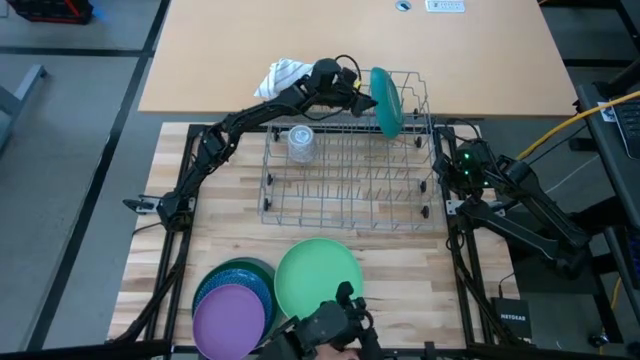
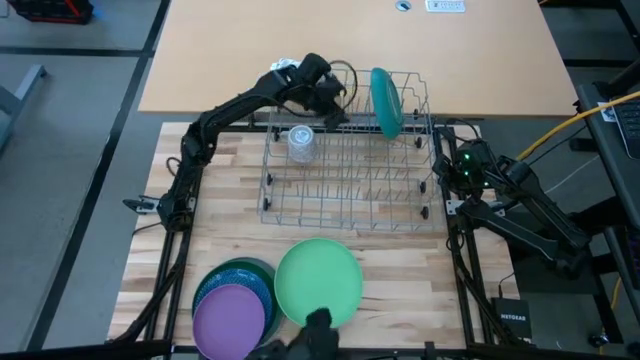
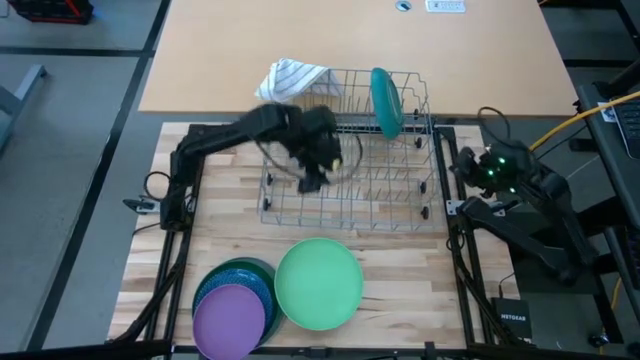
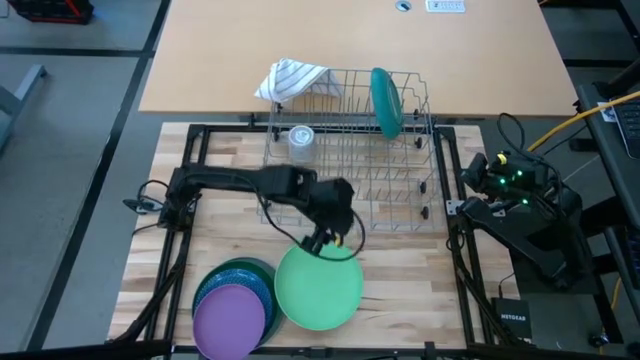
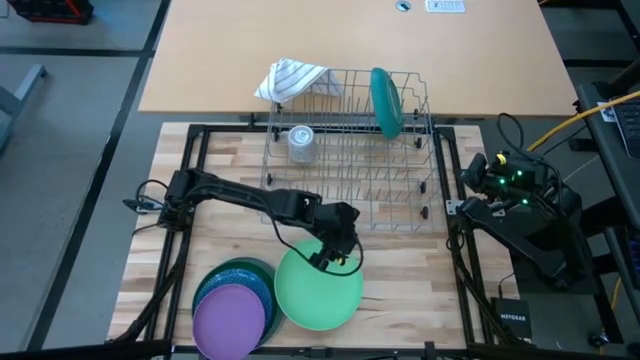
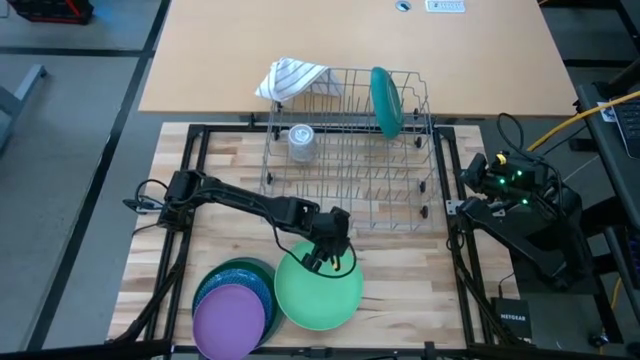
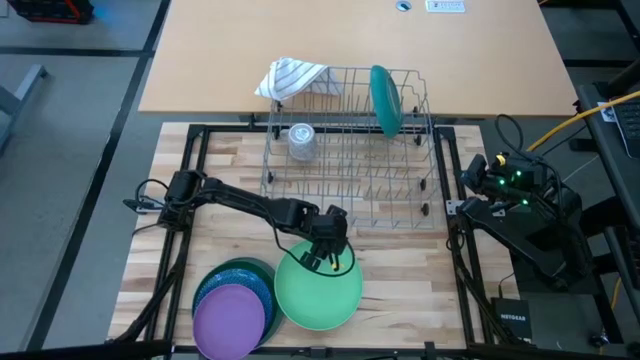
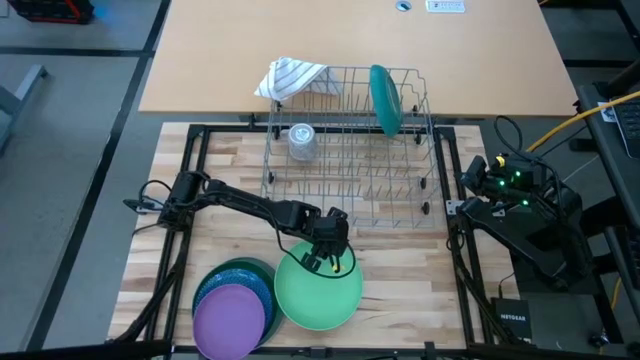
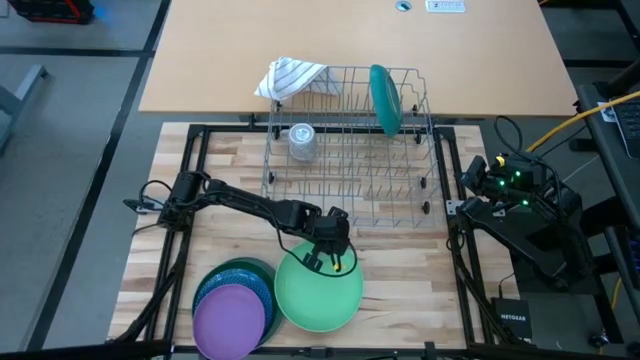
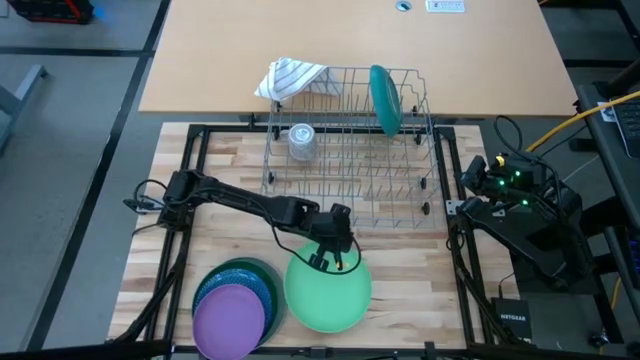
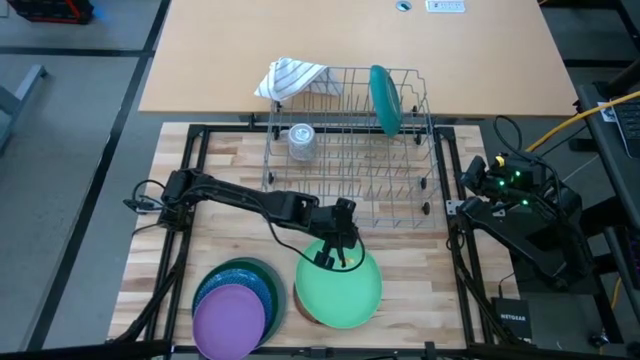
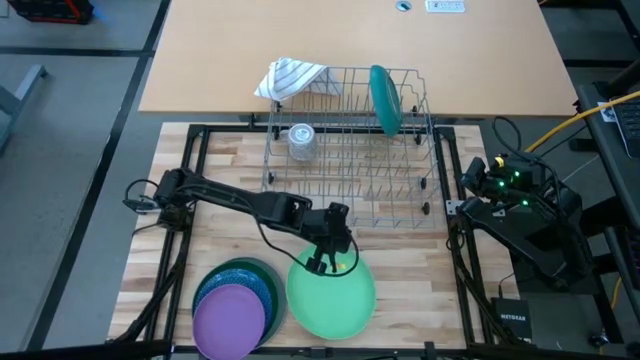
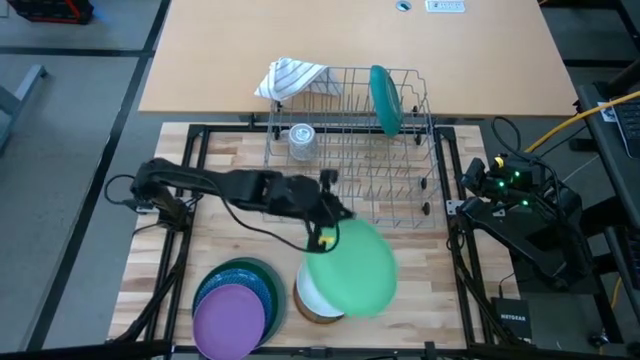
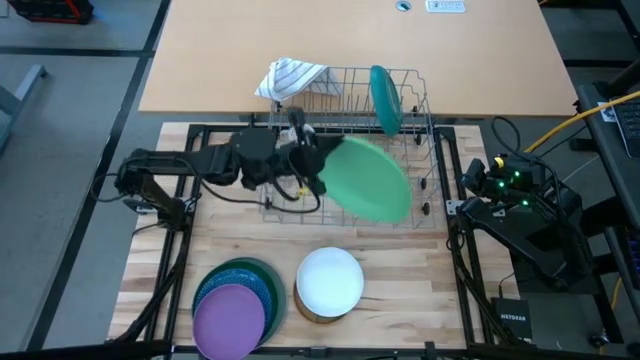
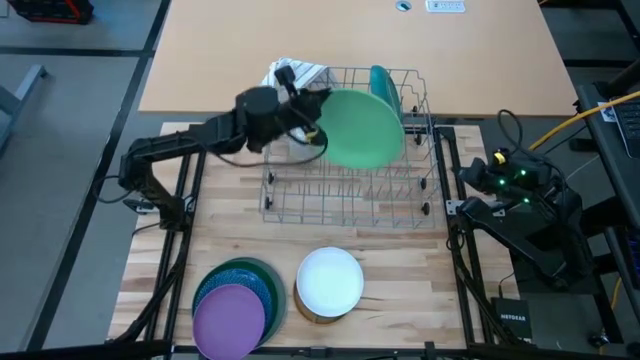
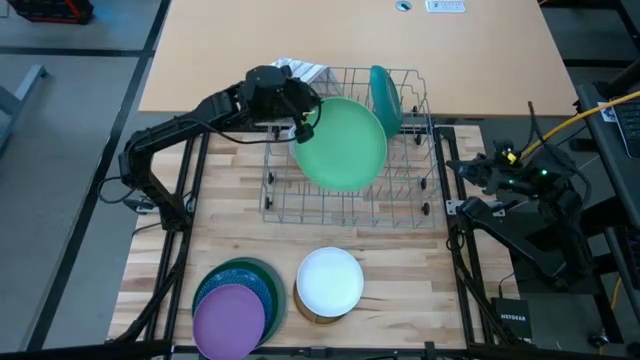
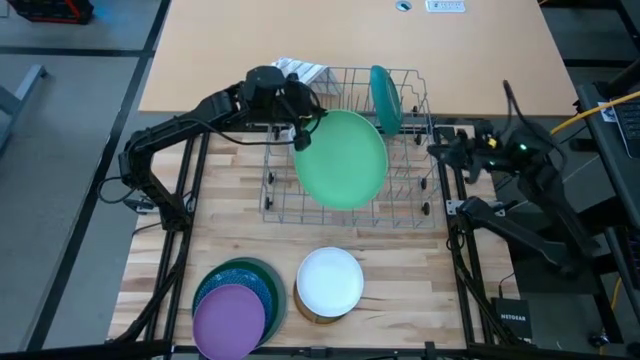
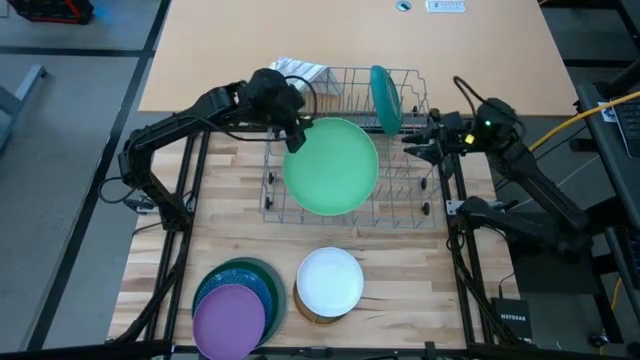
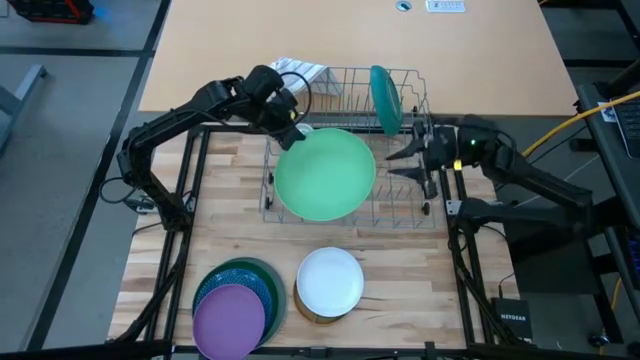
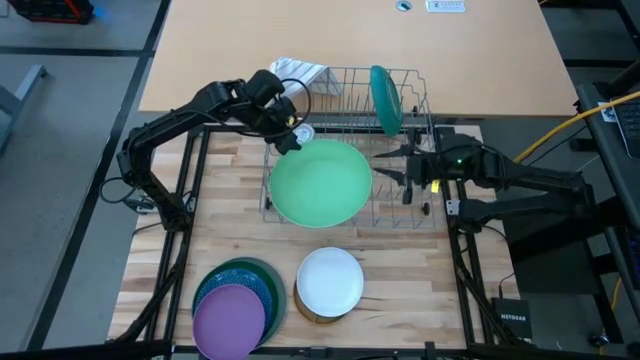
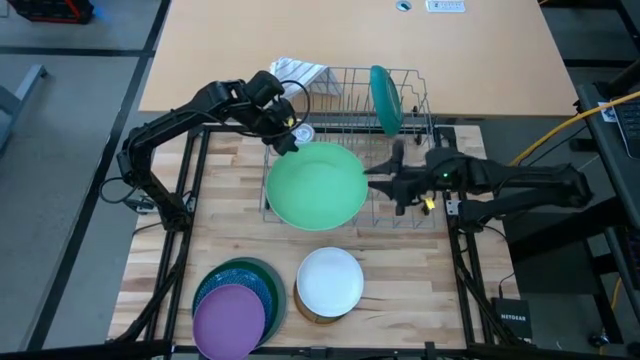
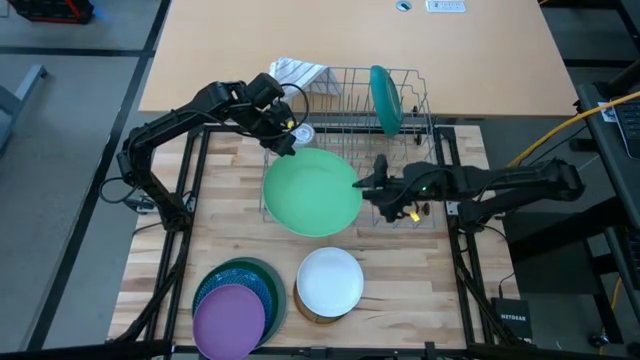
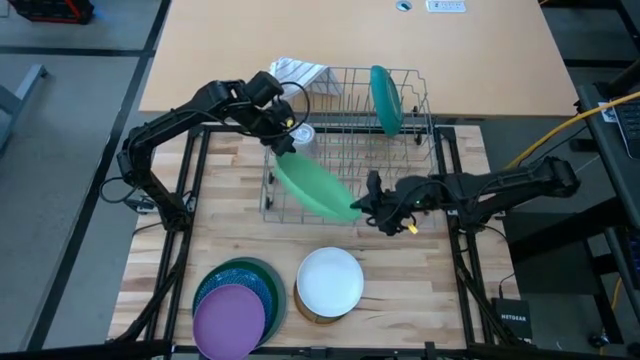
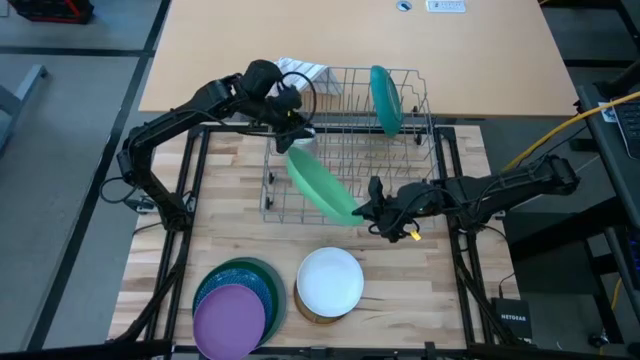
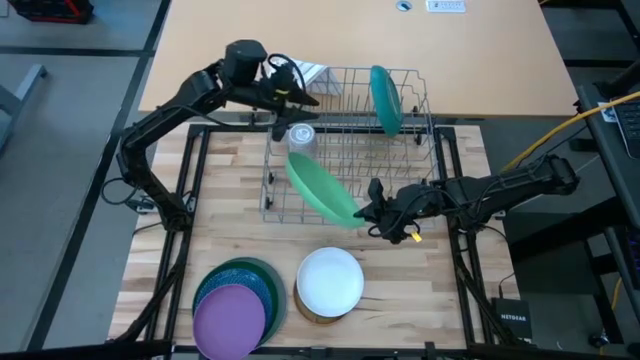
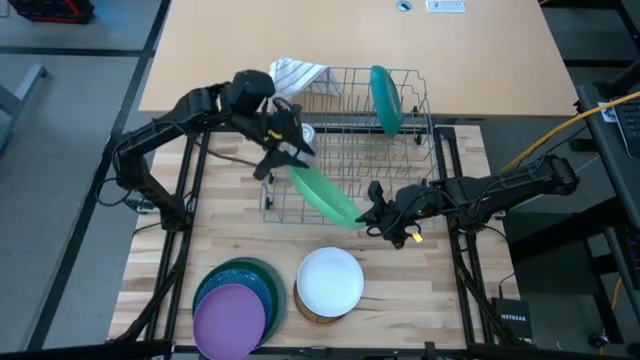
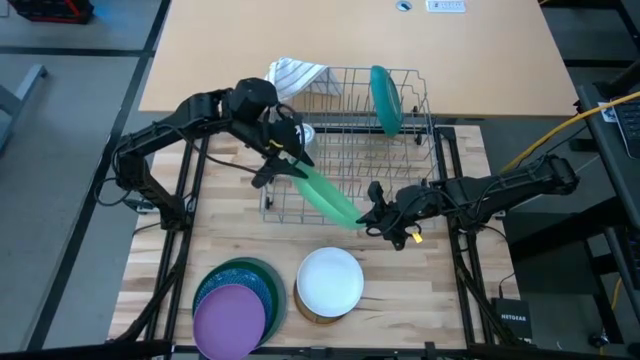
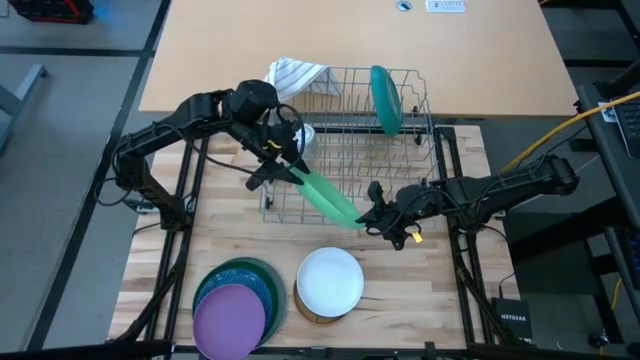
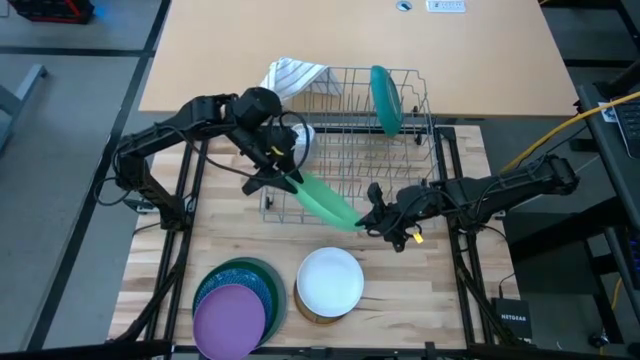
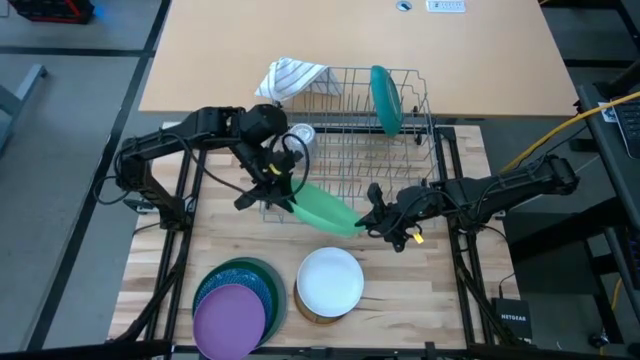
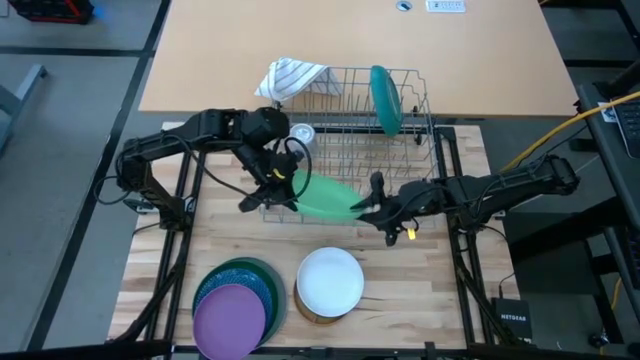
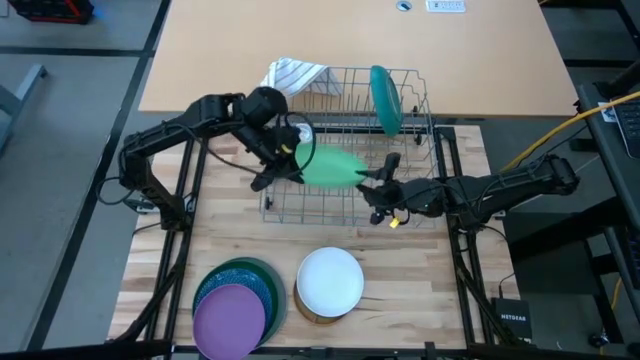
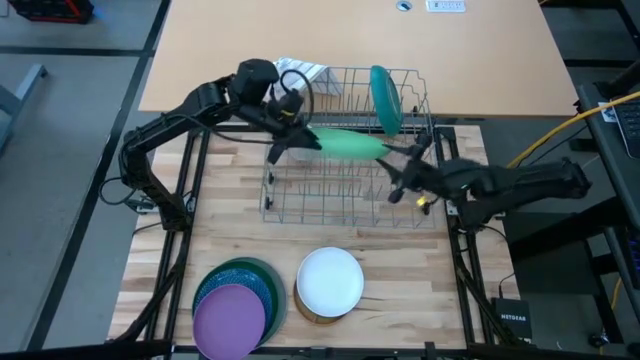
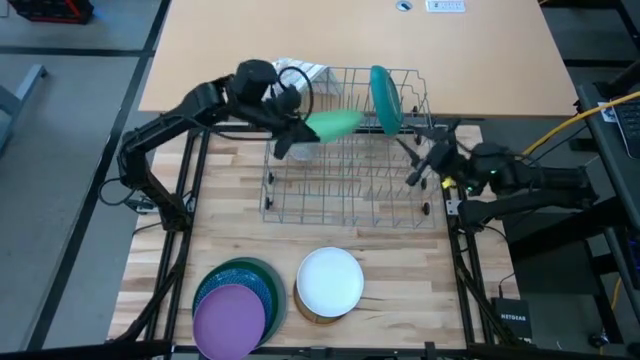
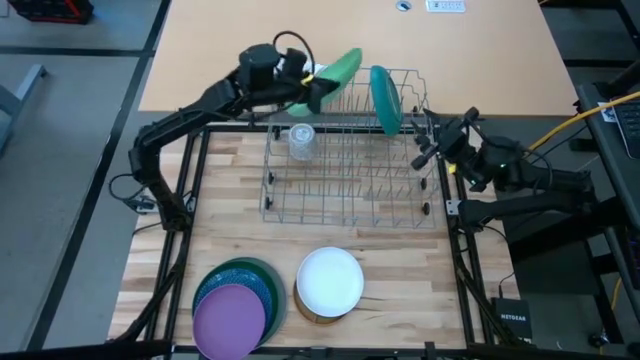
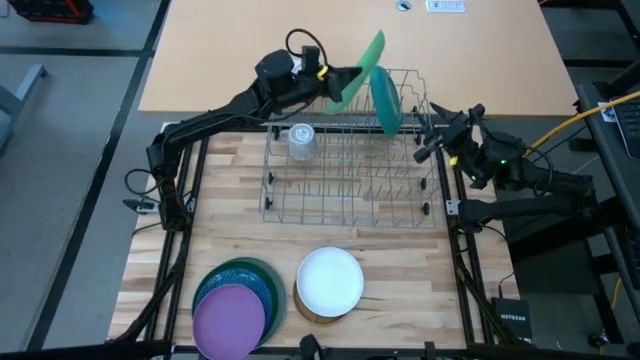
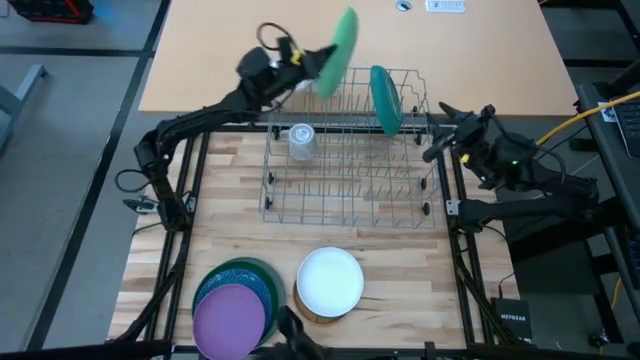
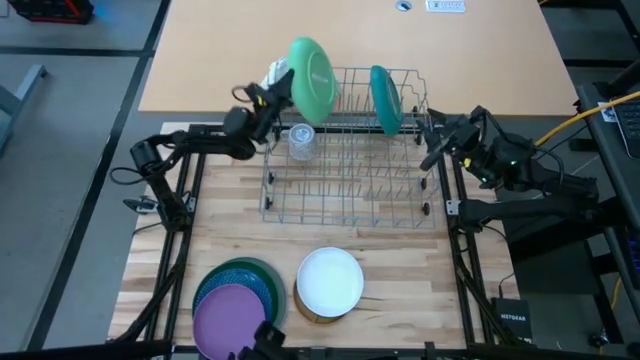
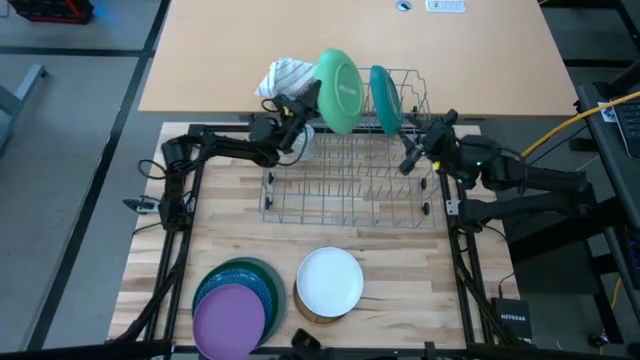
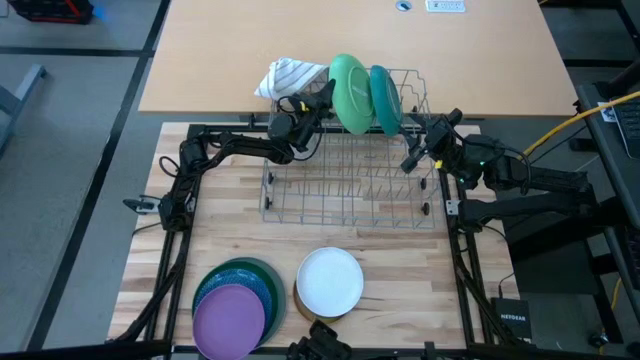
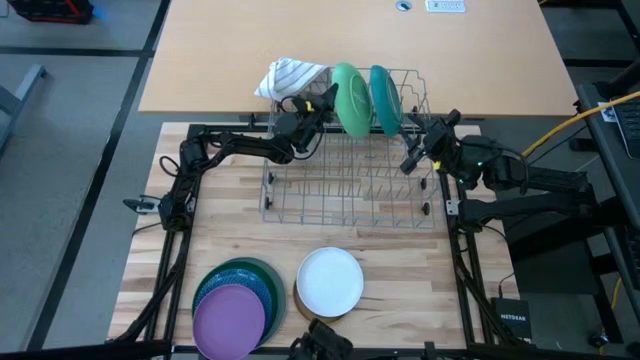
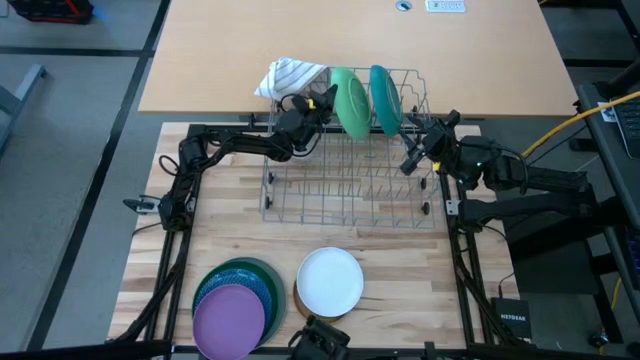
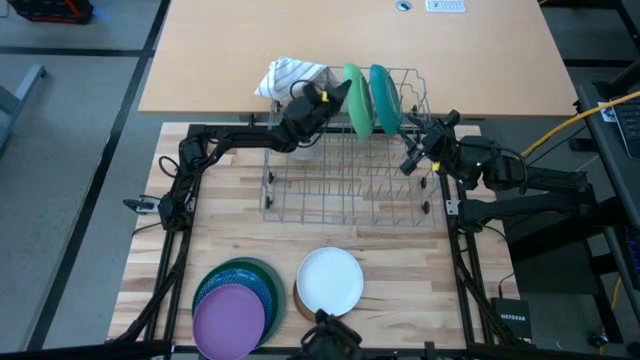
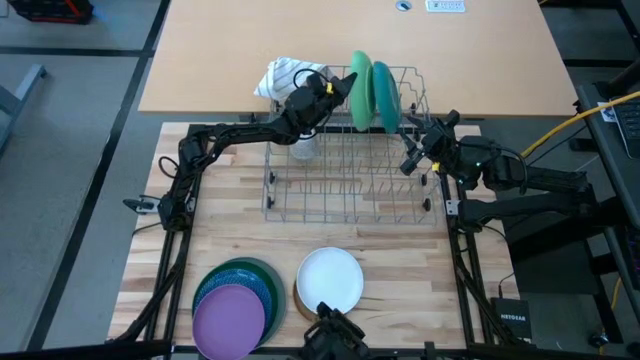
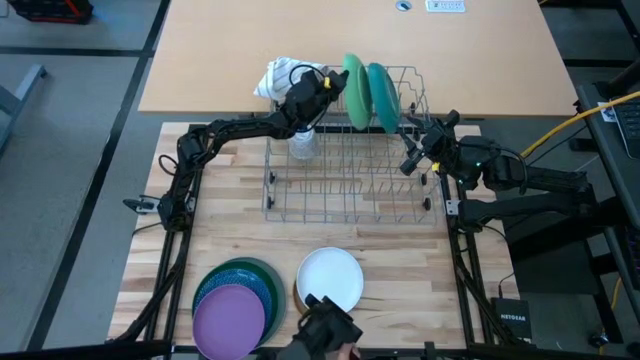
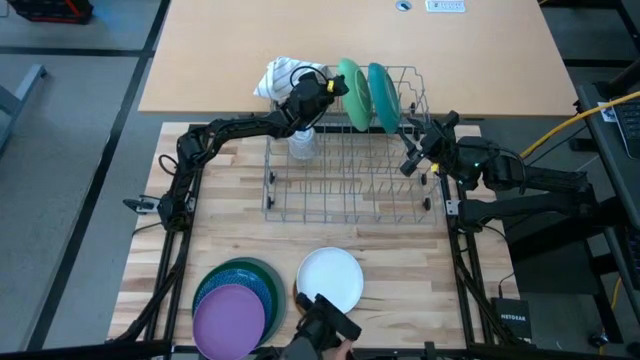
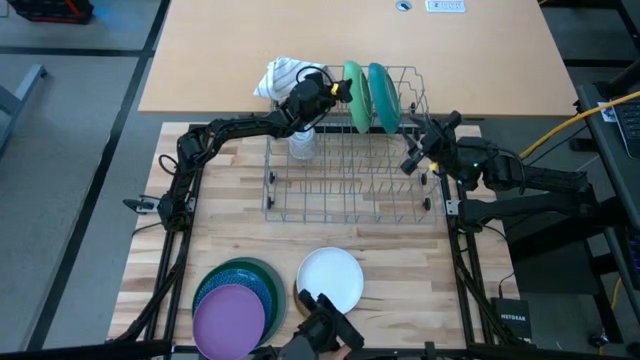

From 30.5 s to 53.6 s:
Task: Sort dishes
Put the light green plate in the dishwasher rack
